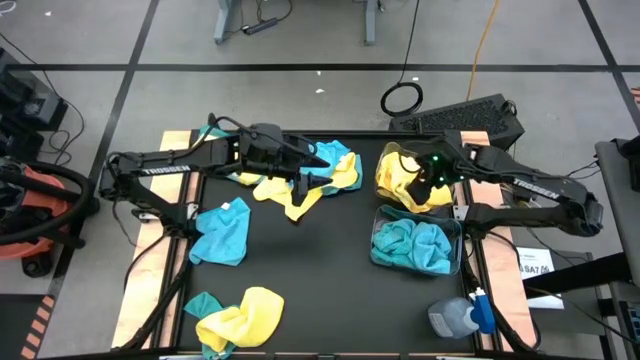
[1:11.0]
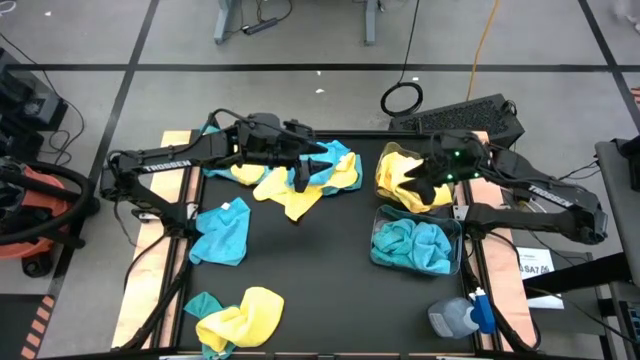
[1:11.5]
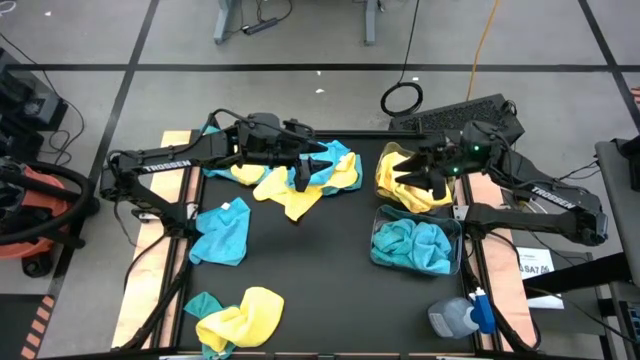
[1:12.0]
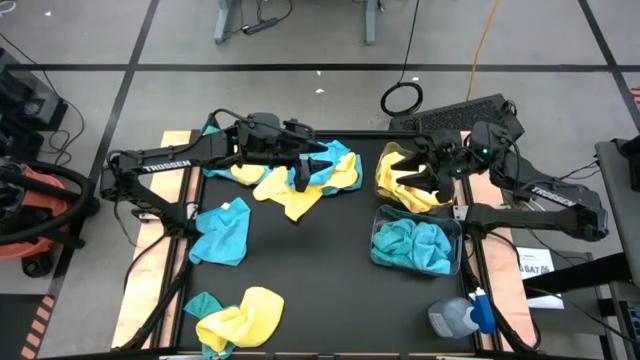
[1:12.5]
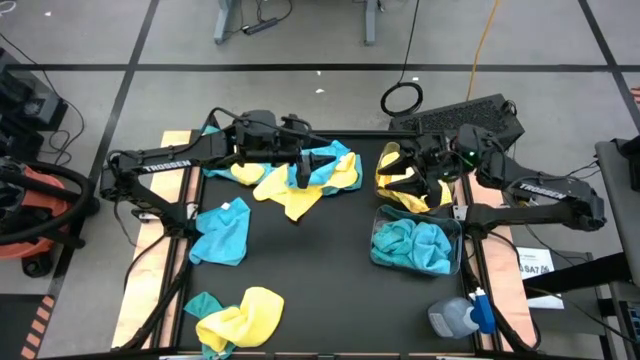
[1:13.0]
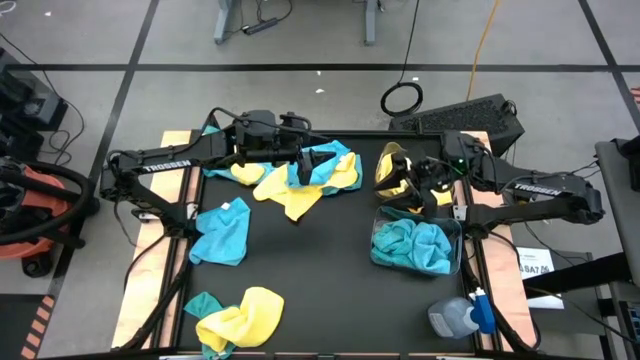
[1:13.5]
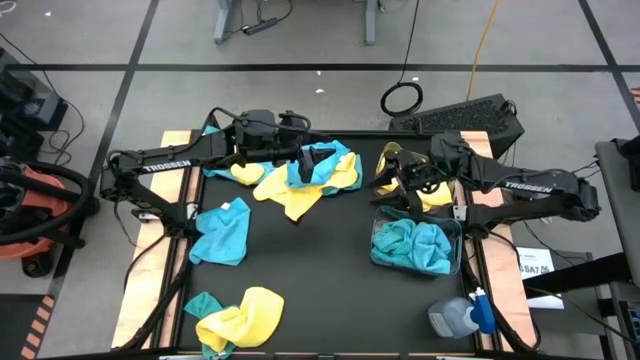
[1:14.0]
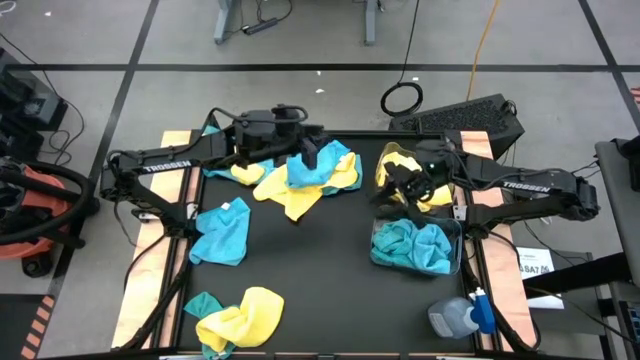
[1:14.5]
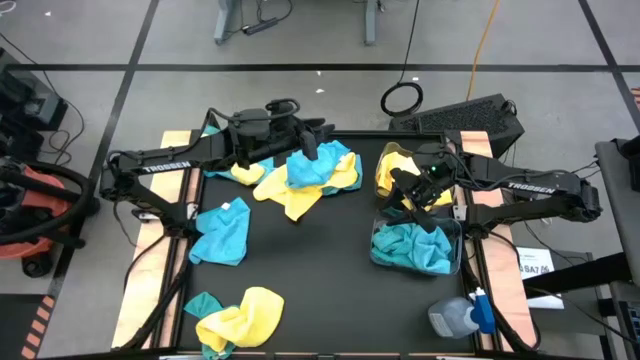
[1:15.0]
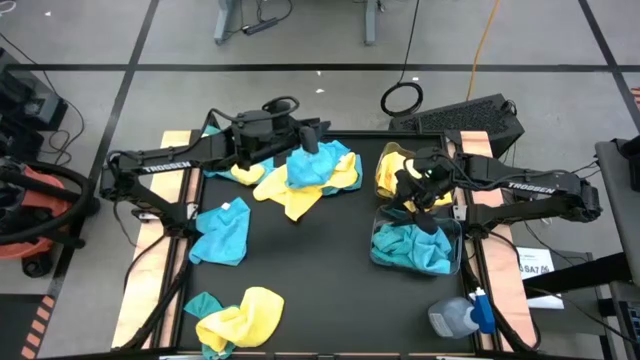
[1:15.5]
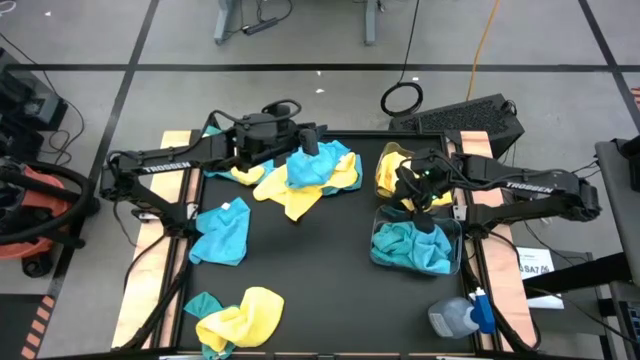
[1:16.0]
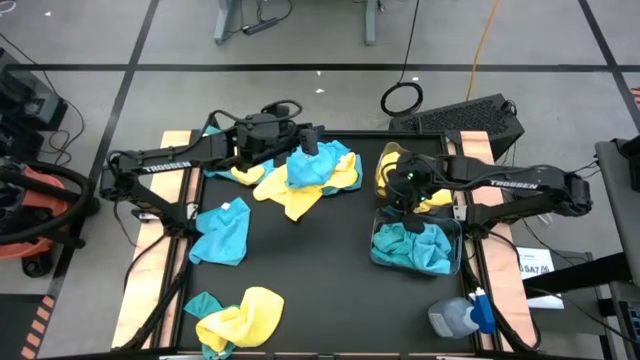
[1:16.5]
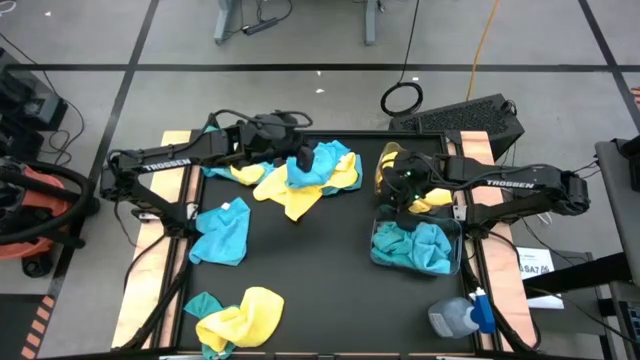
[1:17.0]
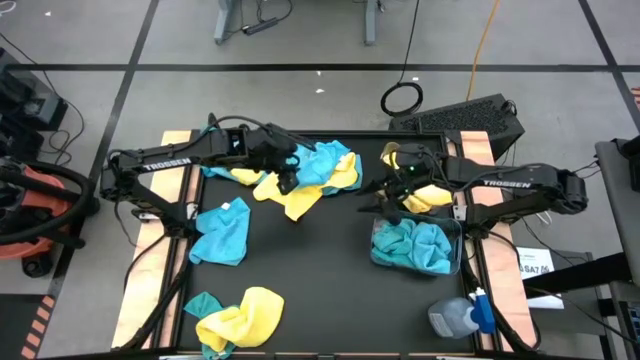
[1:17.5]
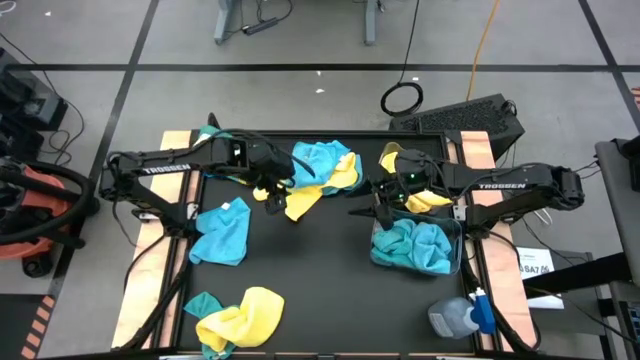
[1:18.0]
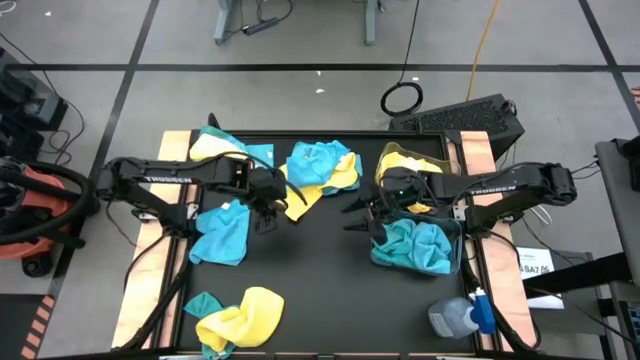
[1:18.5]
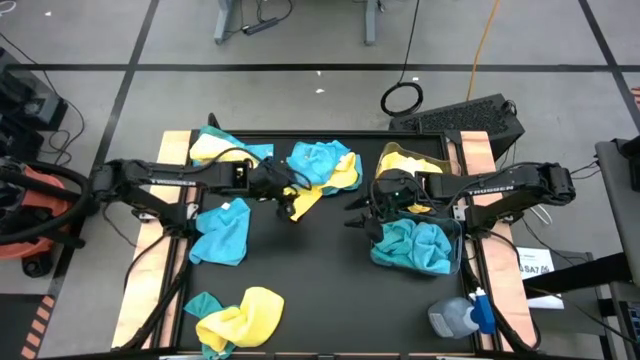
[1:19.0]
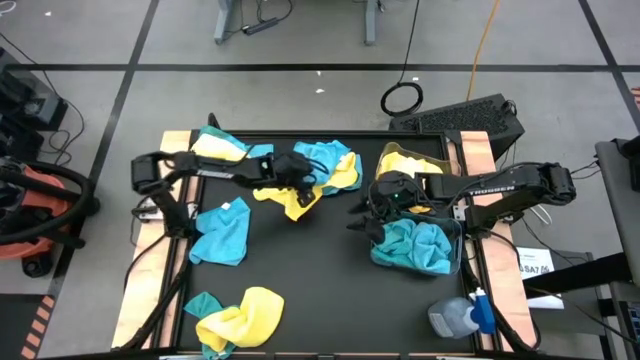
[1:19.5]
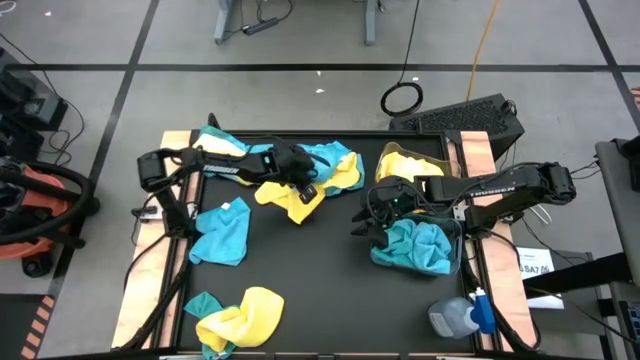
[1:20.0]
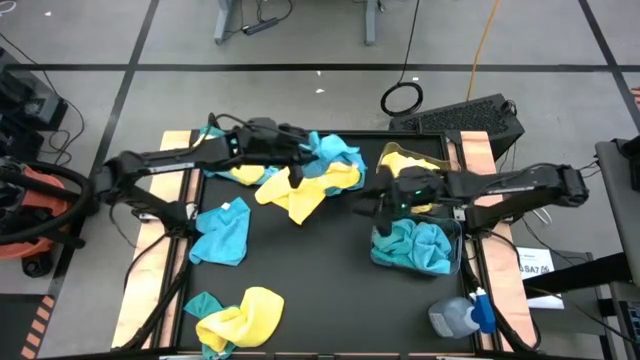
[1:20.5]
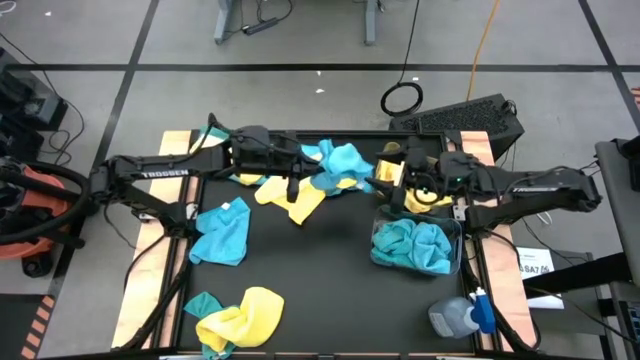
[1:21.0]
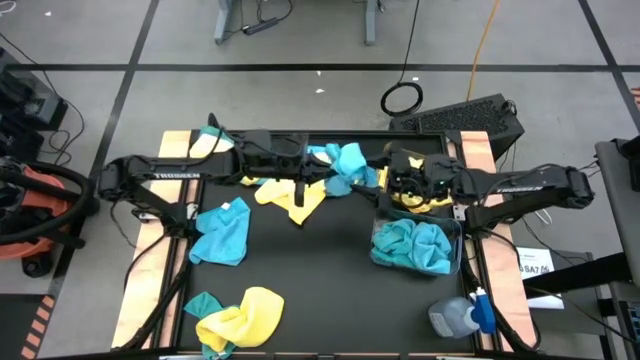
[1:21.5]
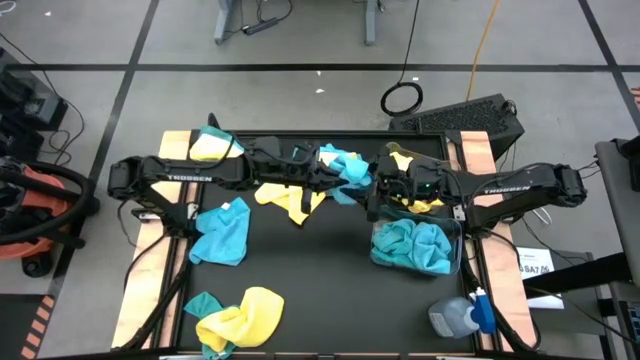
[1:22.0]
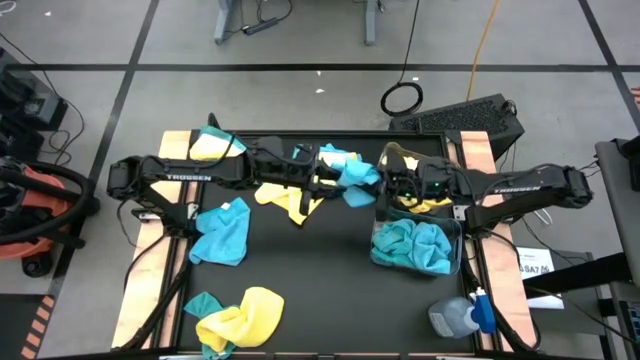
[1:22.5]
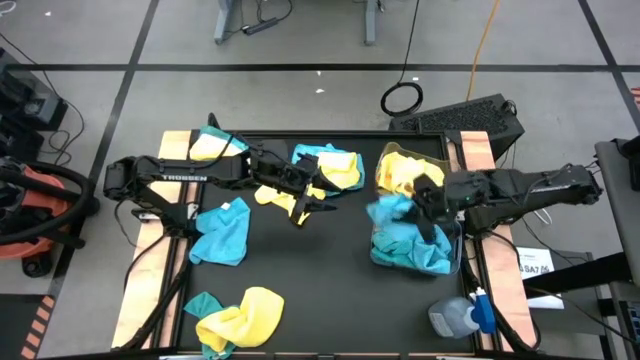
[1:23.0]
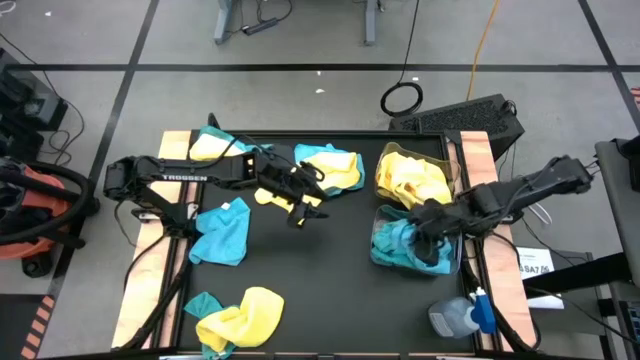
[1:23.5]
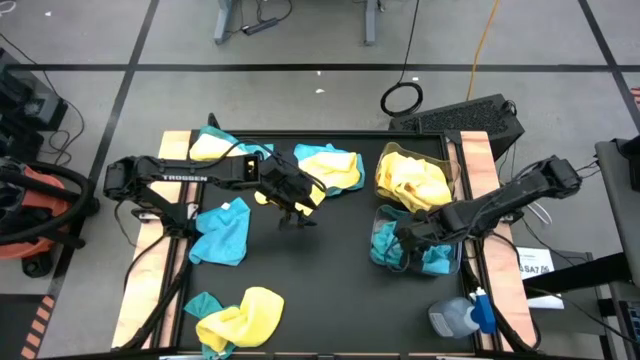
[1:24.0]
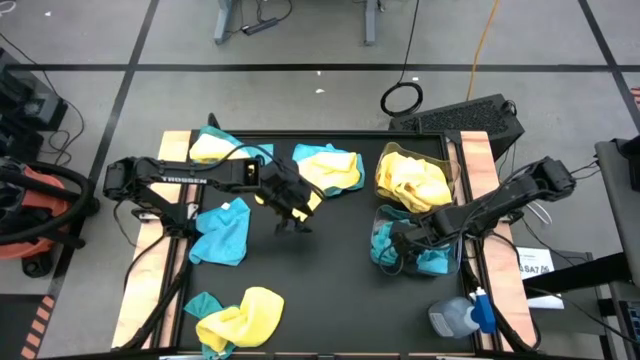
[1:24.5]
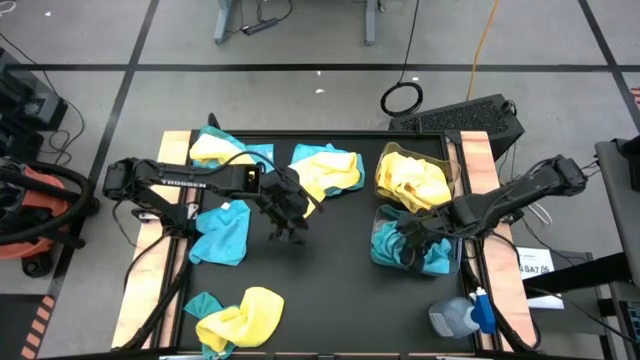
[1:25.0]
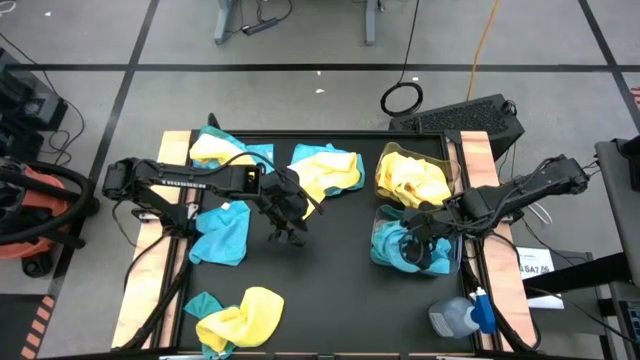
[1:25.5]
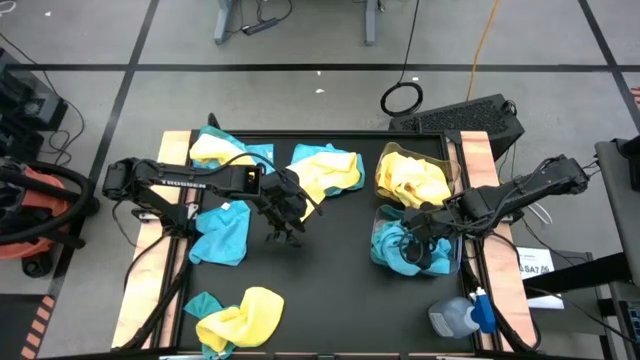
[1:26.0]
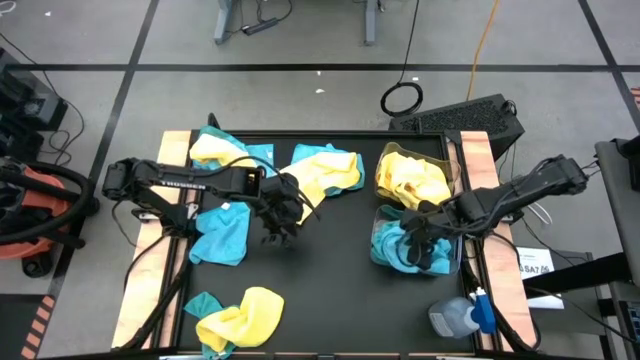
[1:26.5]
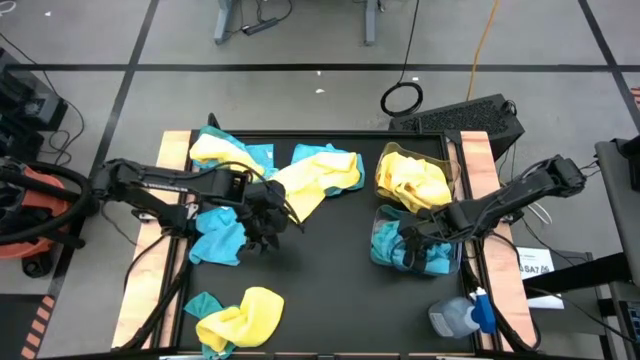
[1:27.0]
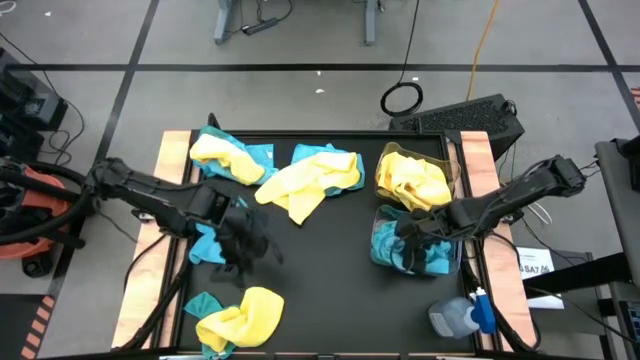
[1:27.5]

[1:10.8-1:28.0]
Task: Sort microfiber towel by color & place in baskets
Put the blue microfiber cloth into the bottom transparent bin

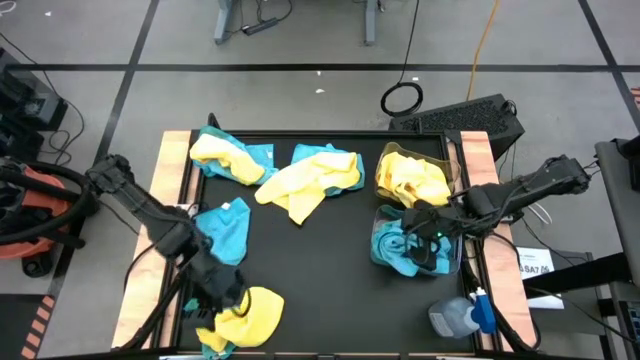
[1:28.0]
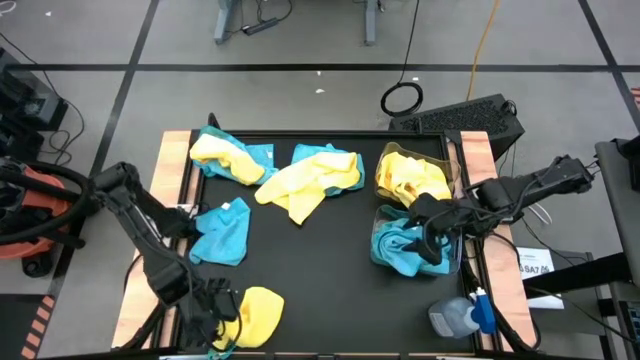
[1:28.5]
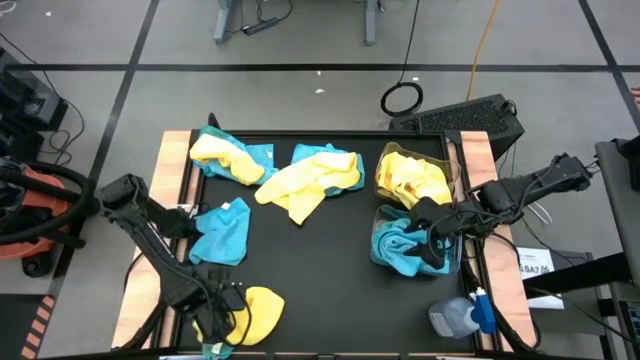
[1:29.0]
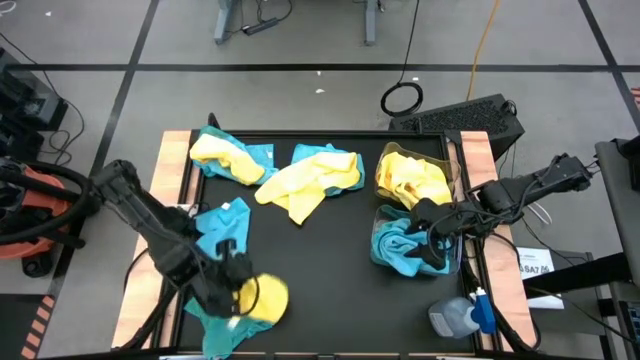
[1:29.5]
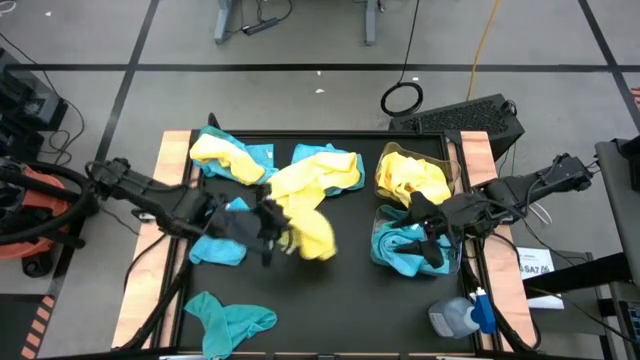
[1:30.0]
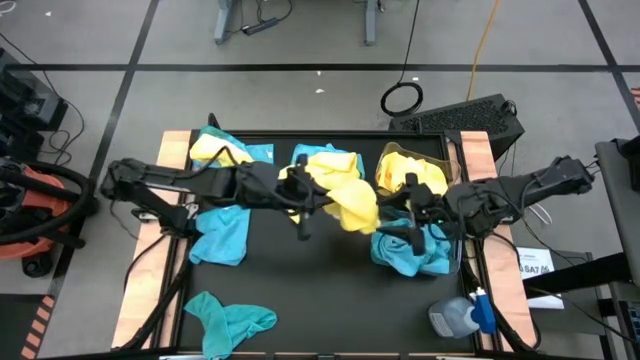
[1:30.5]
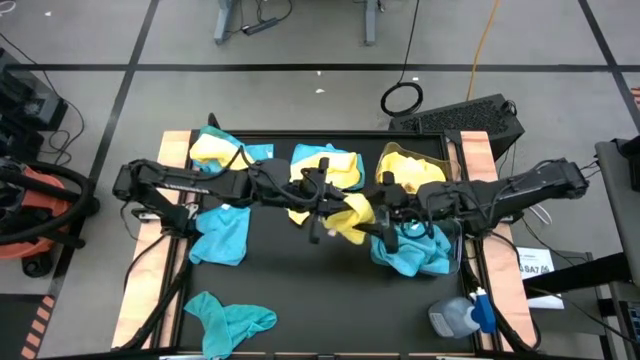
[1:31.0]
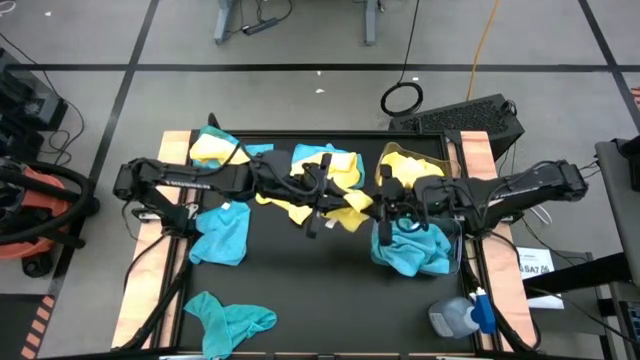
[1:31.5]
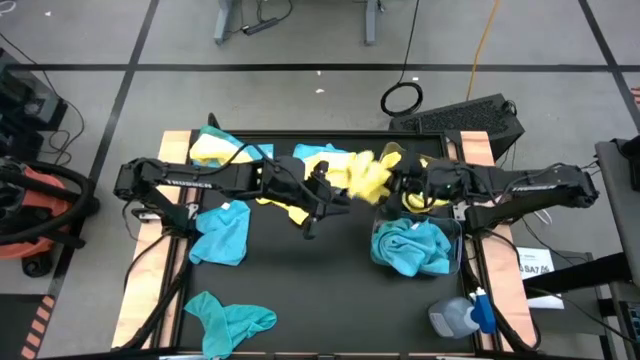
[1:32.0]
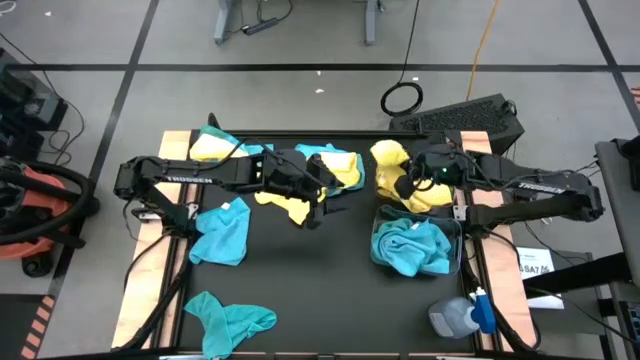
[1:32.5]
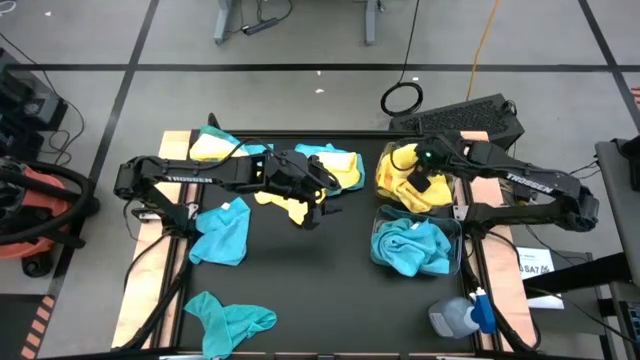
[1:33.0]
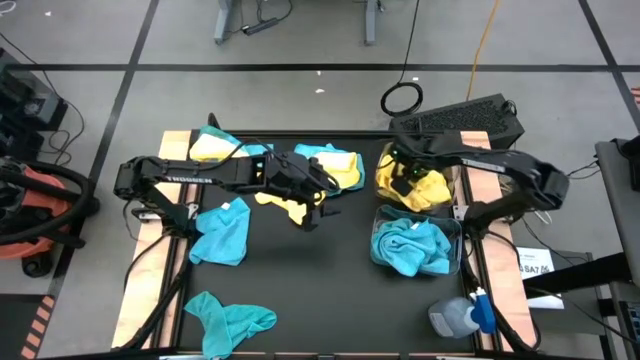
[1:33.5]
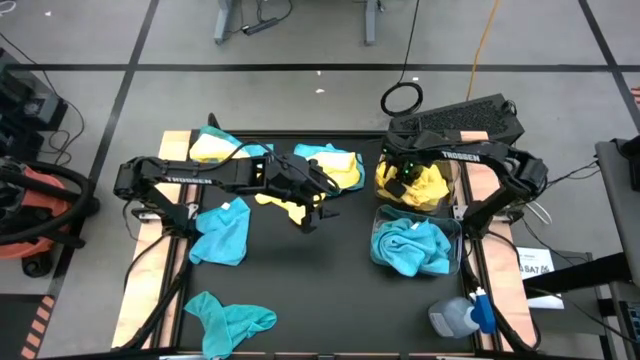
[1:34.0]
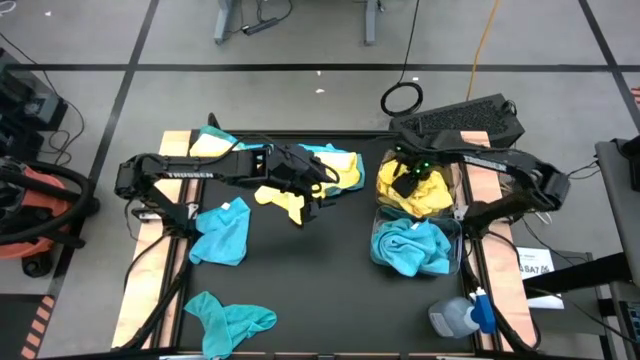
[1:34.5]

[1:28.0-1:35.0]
Put the yellow microfiber cloth into the top transparent bin
